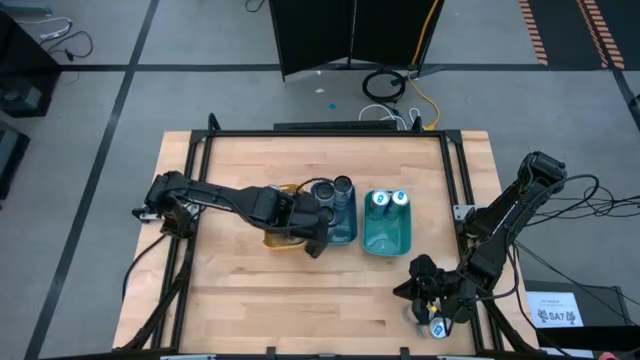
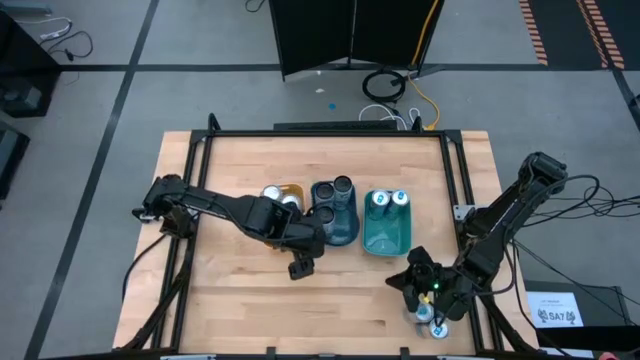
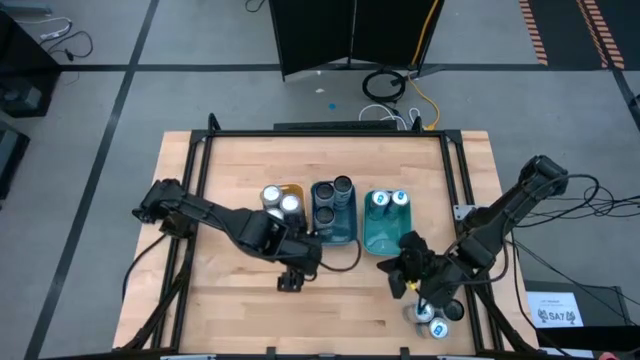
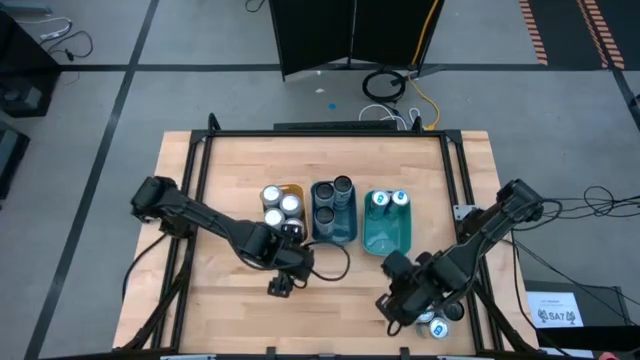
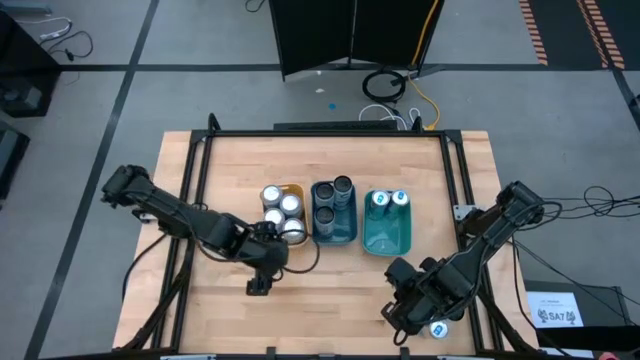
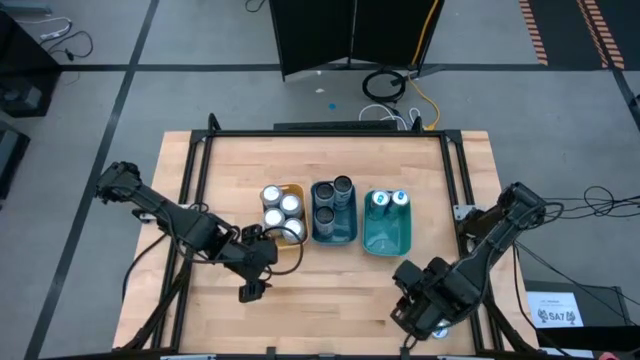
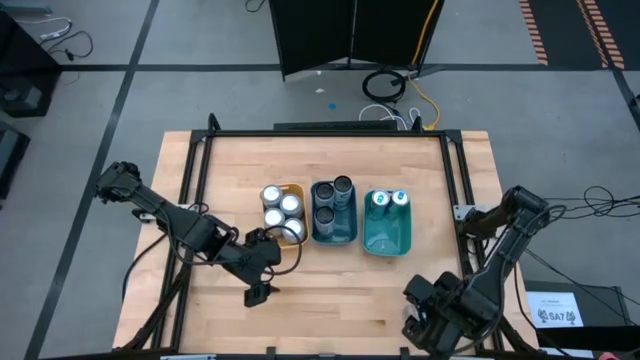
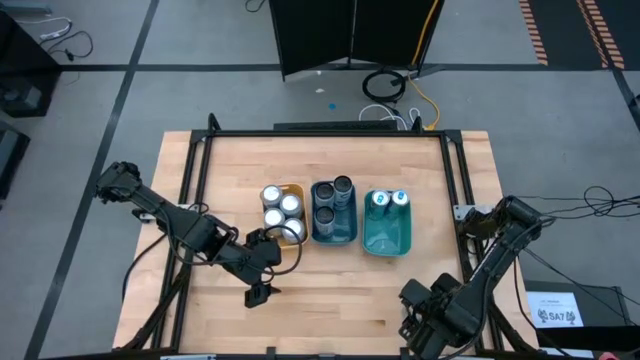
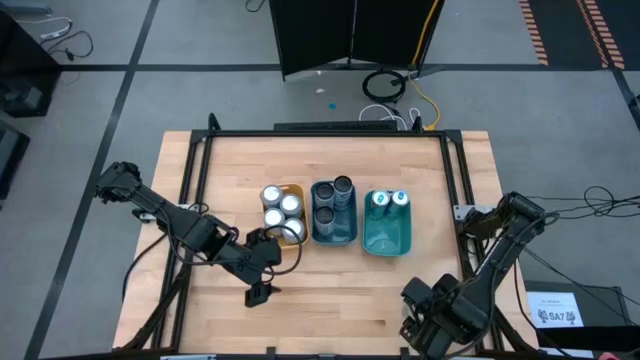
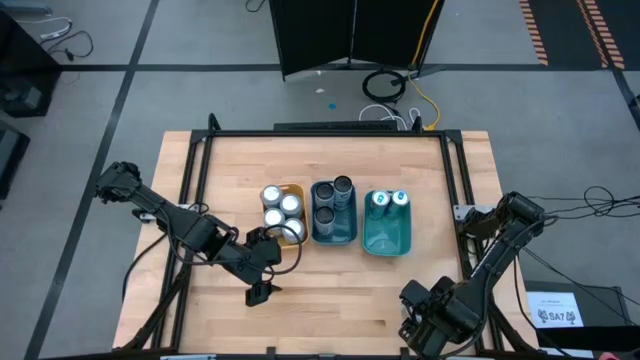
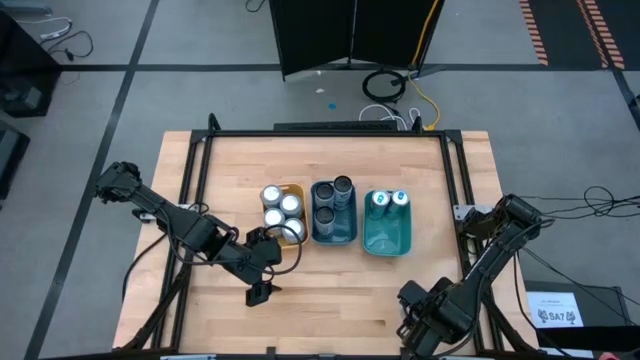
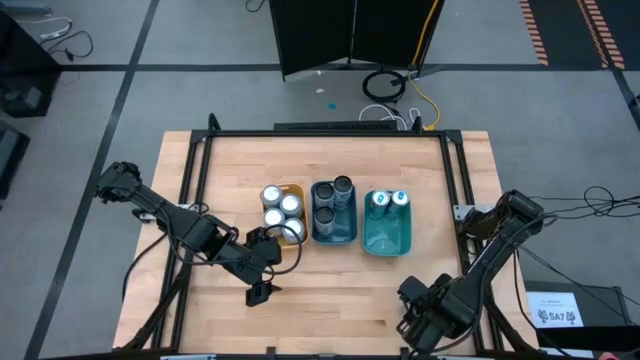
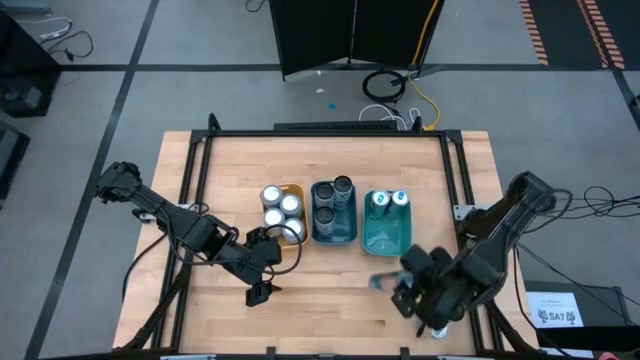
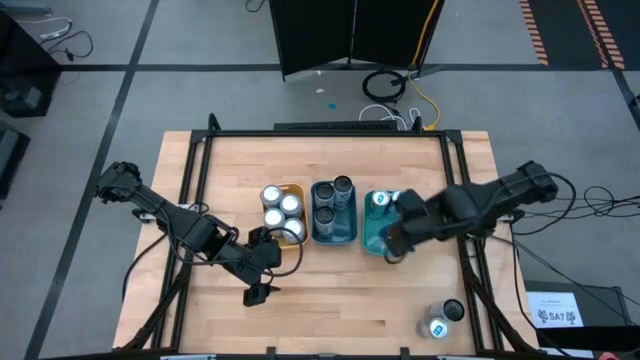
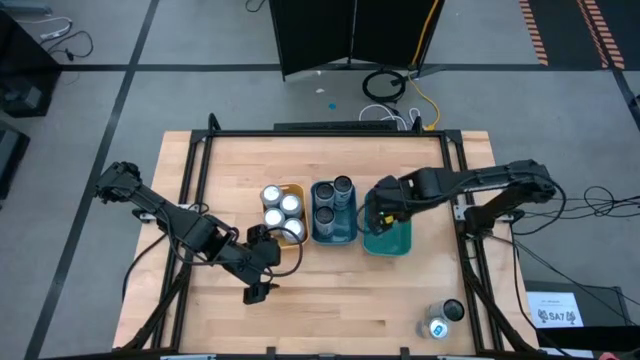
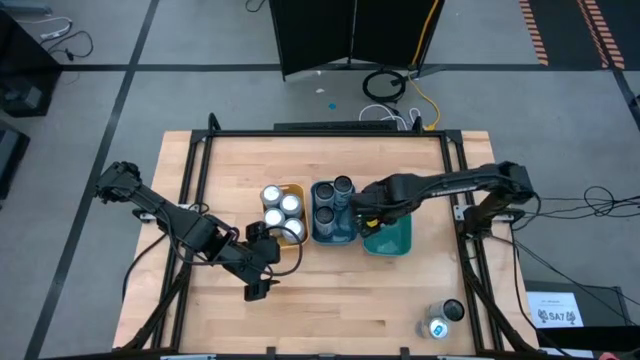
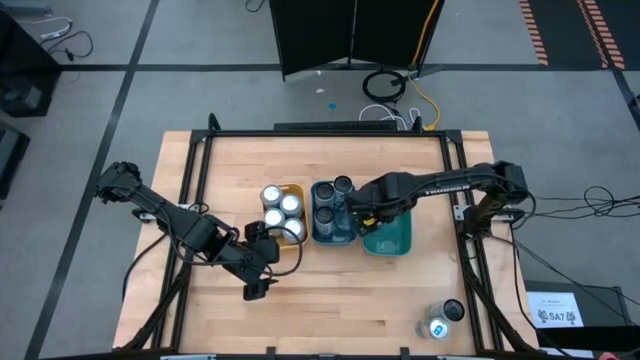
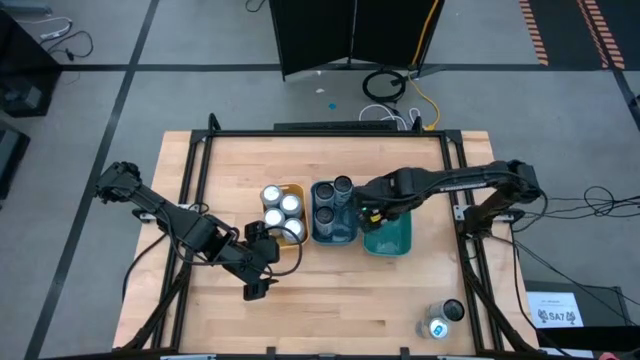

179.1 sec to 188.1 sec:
Task: Sort soda cans
Put the blue soda can into the green bin

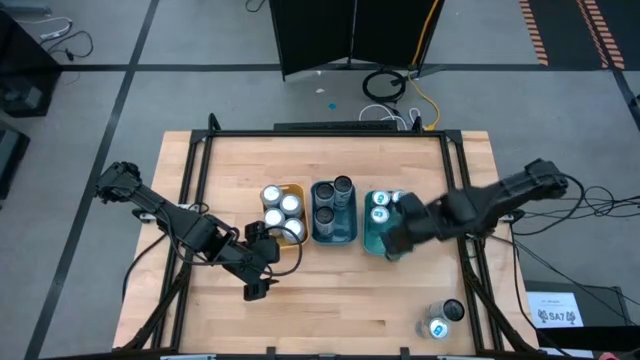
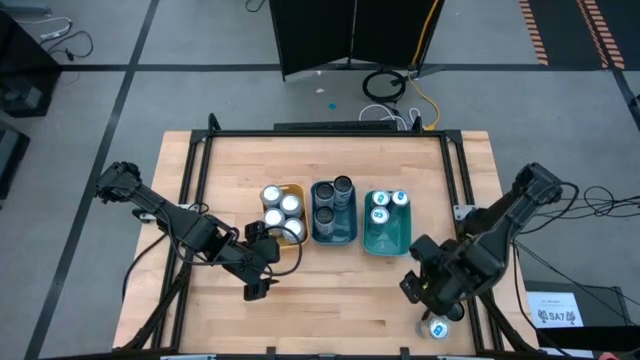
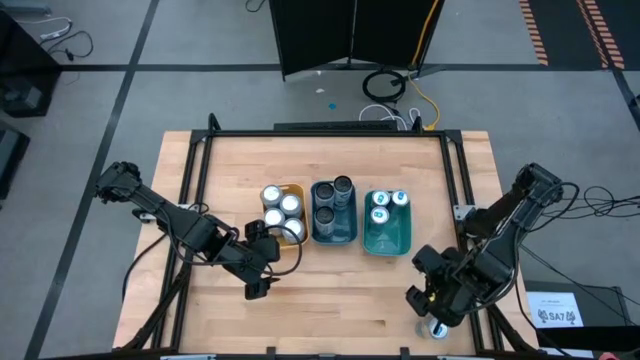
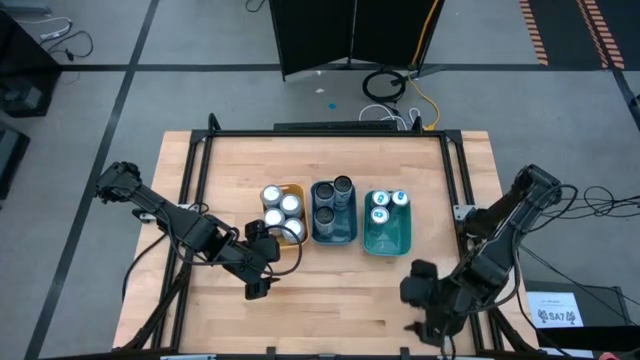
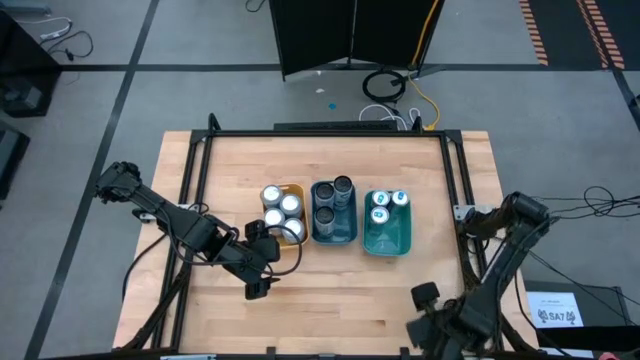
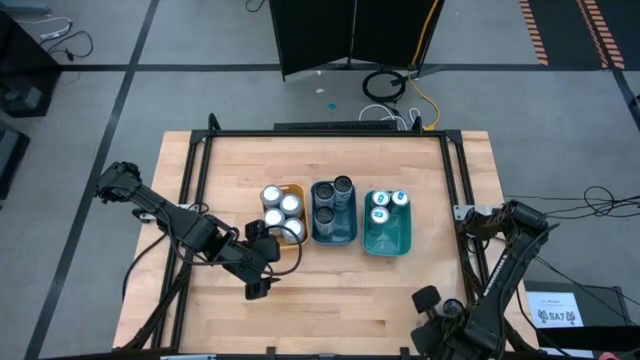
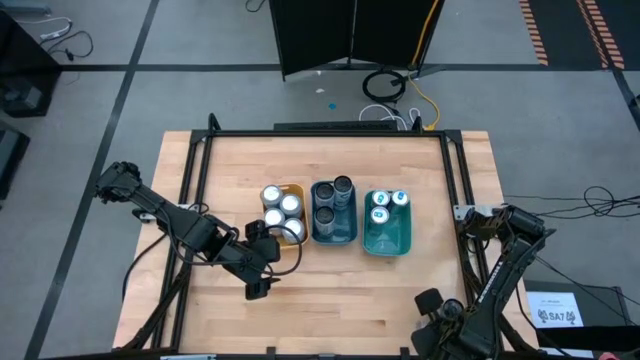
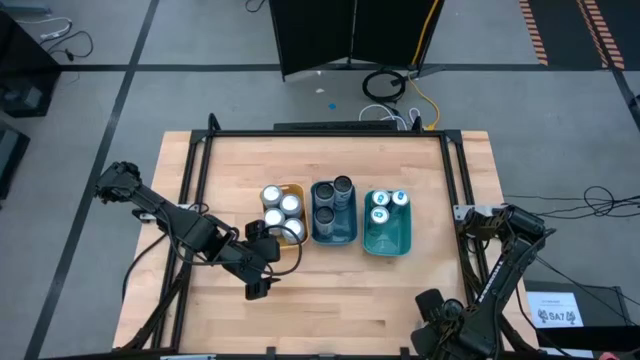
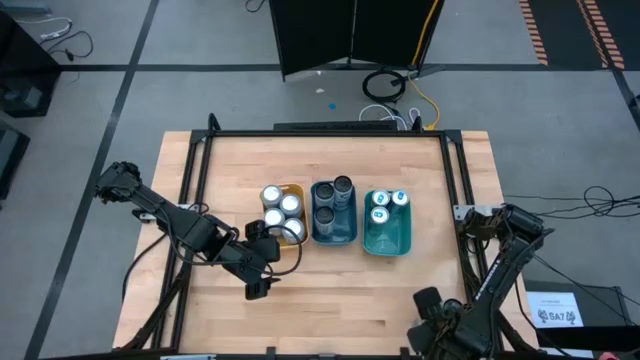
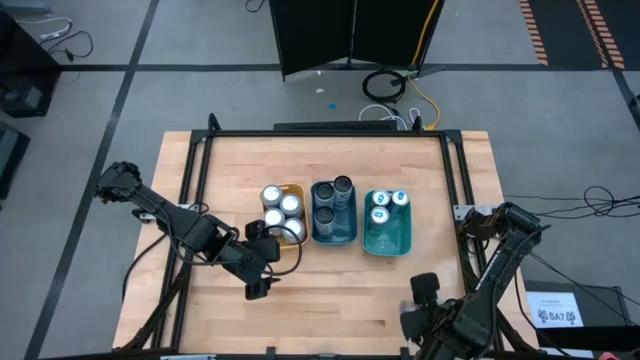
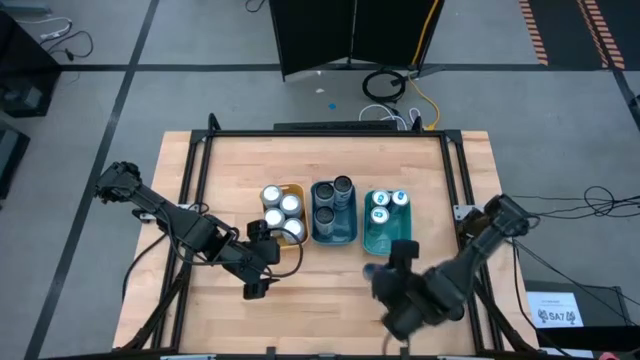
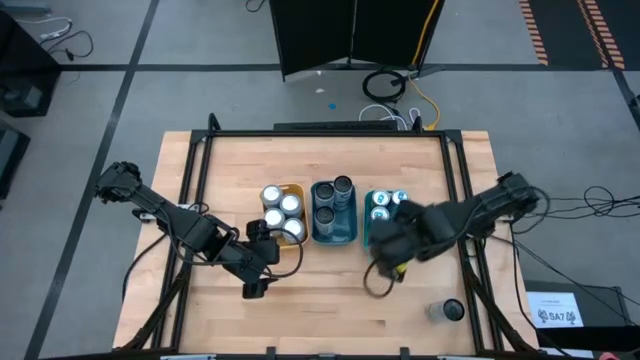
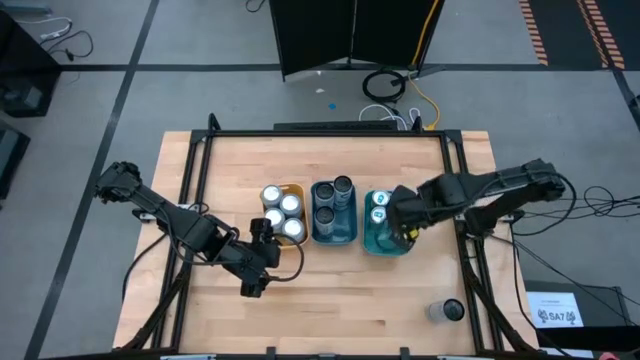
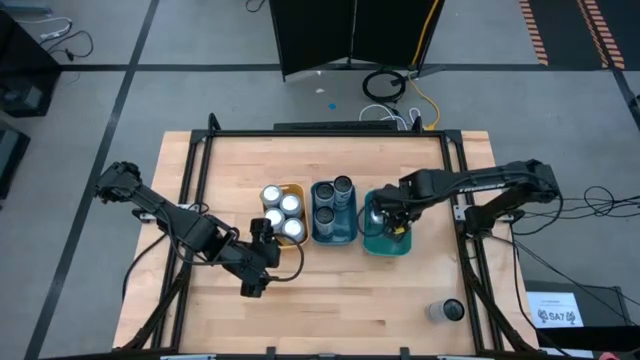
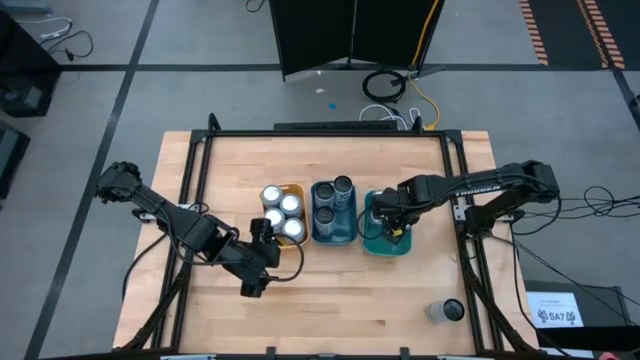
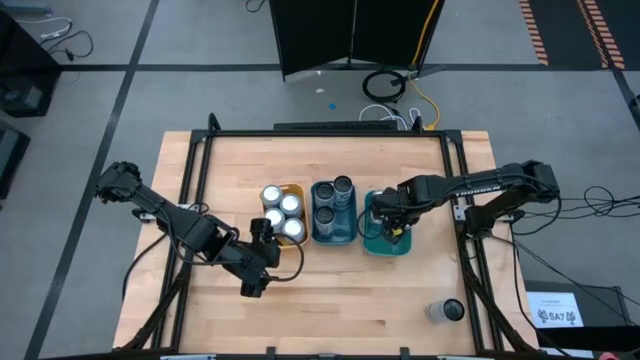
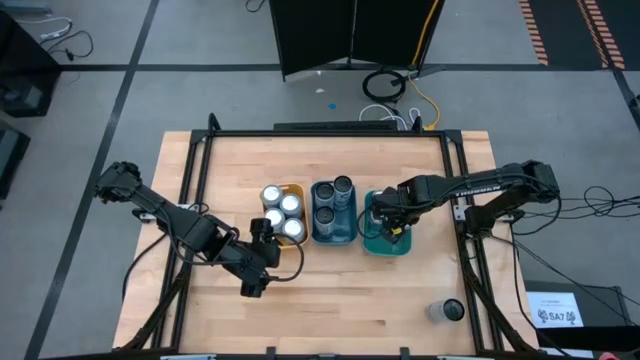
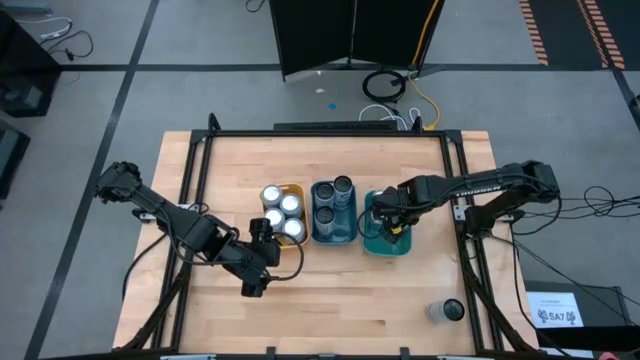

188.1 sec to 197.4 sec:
Put the blue soda can into the green bin

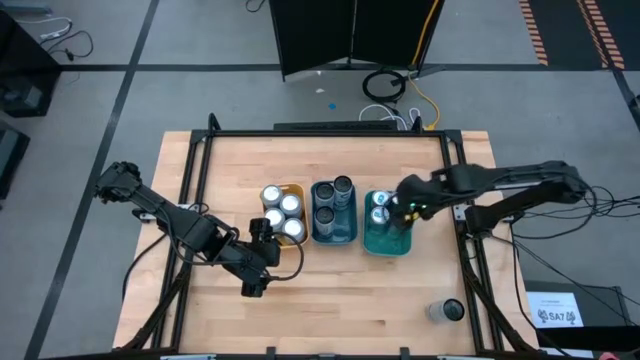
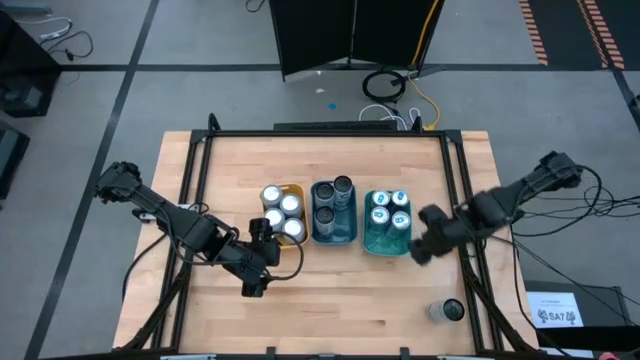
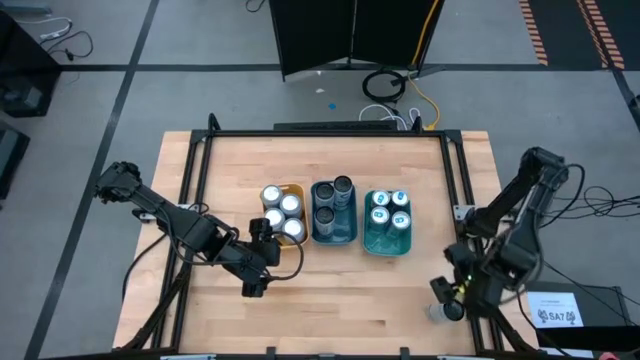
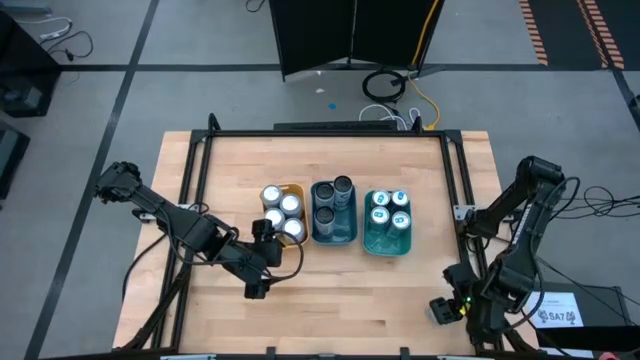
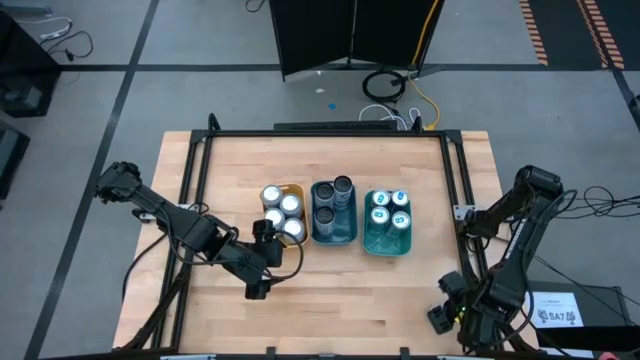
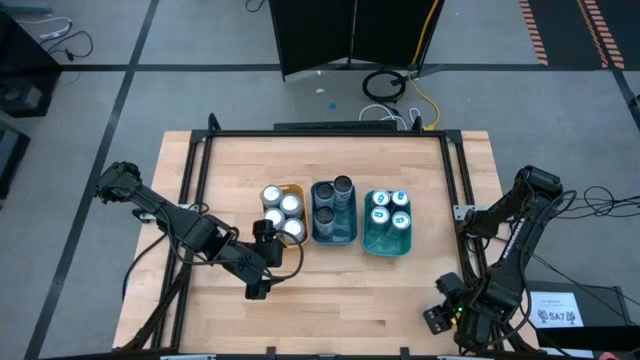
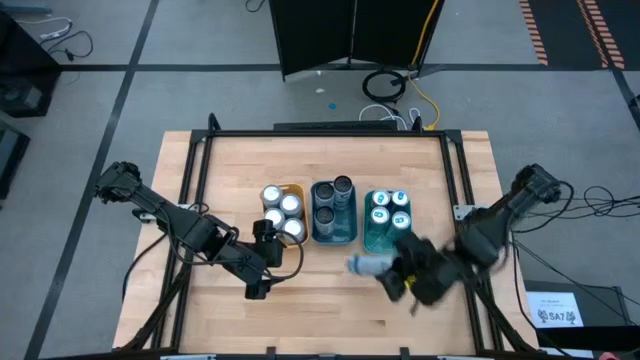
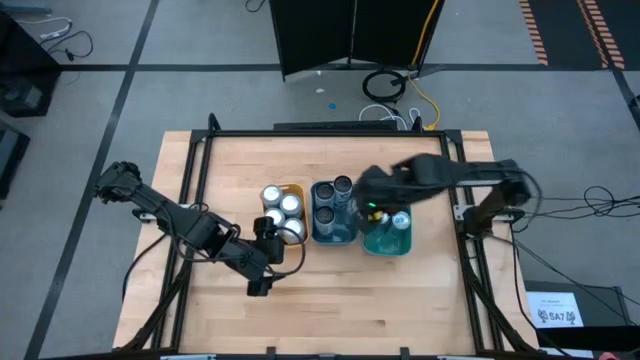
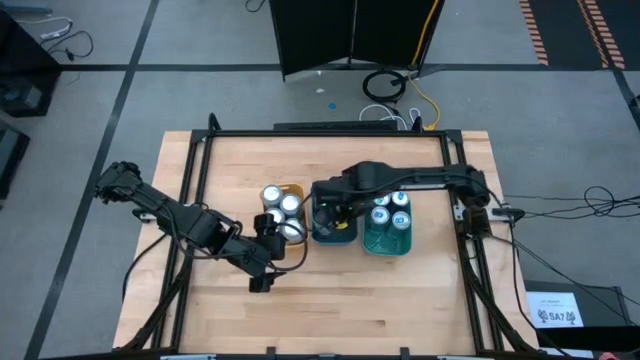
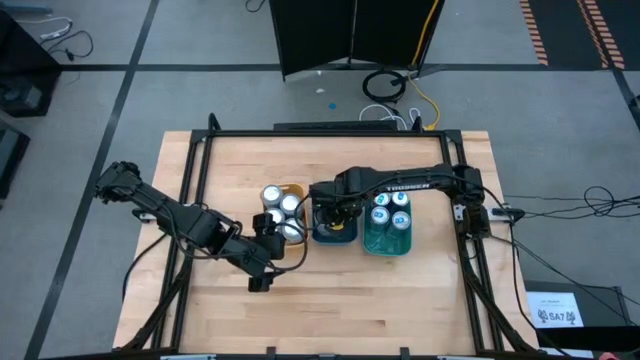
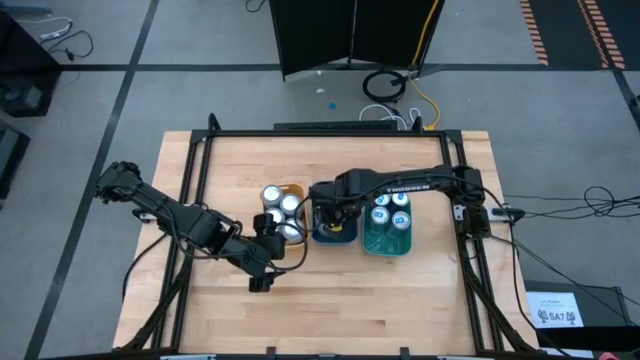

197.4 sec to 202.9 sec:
Put the white-blue soda can into the blue bin
